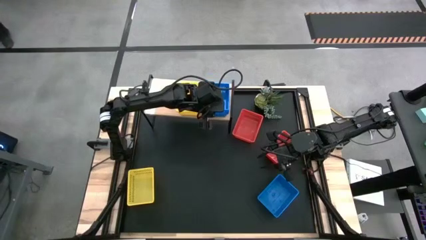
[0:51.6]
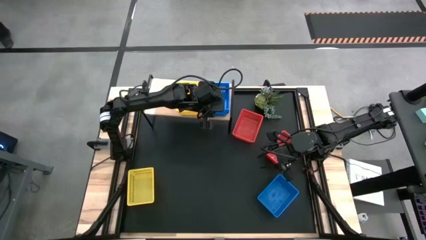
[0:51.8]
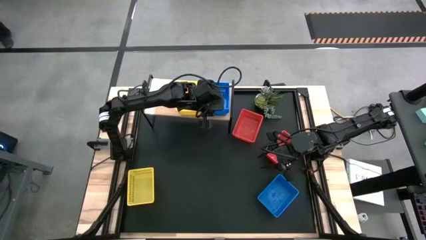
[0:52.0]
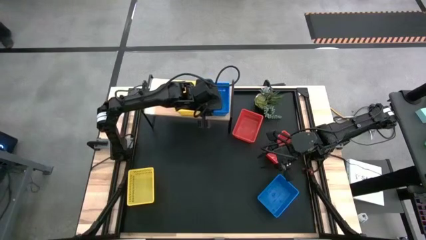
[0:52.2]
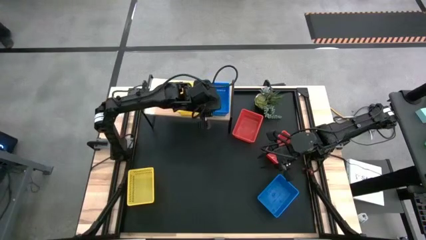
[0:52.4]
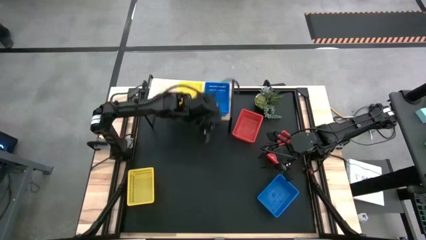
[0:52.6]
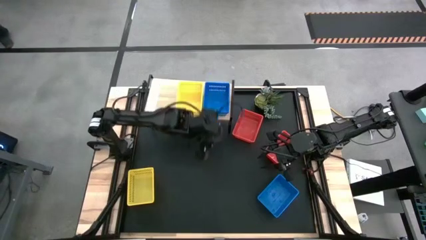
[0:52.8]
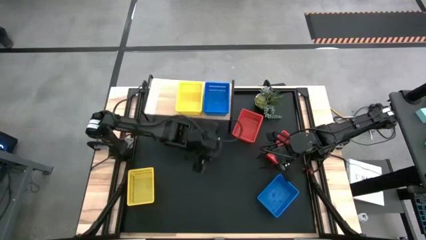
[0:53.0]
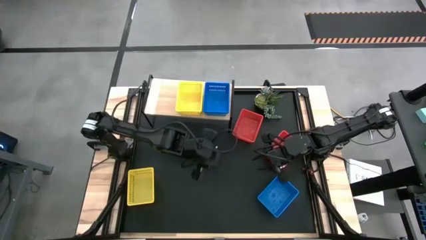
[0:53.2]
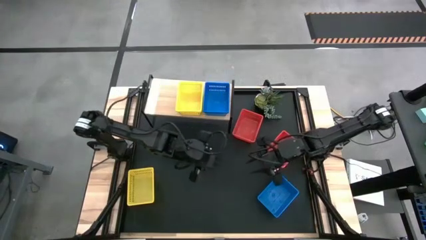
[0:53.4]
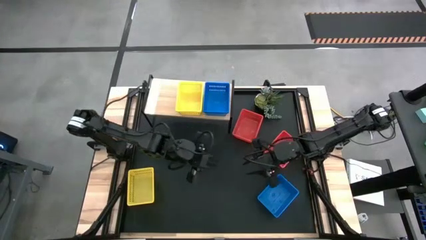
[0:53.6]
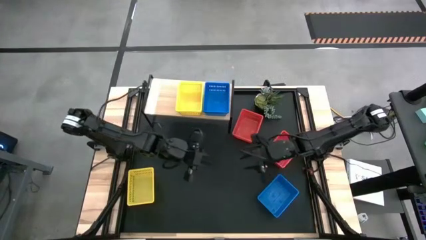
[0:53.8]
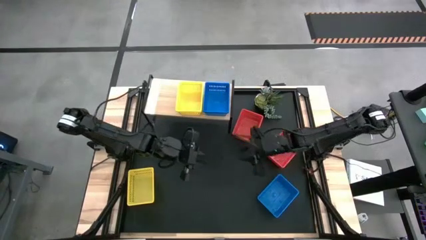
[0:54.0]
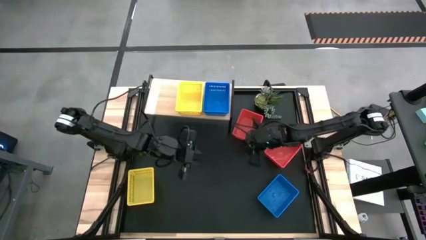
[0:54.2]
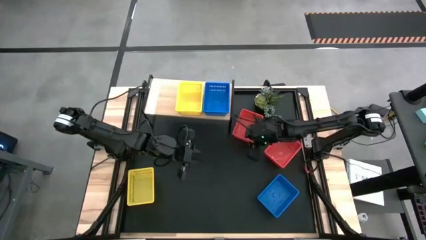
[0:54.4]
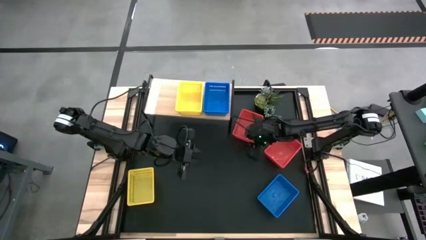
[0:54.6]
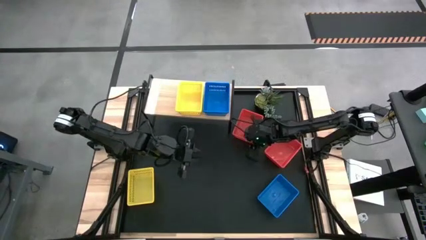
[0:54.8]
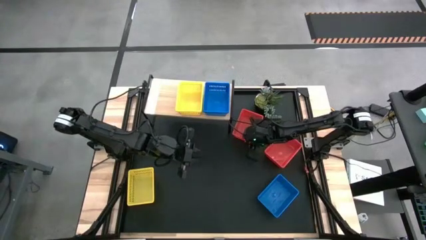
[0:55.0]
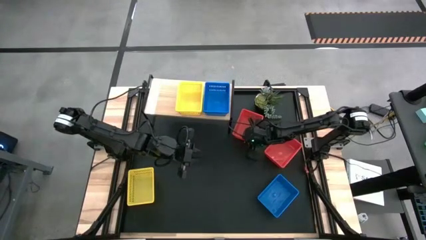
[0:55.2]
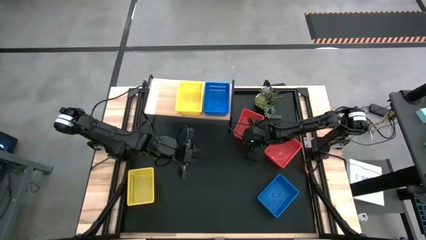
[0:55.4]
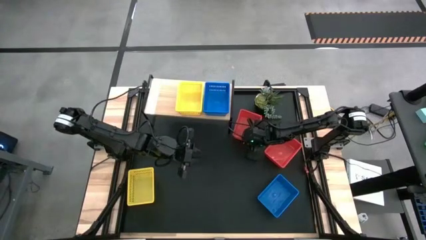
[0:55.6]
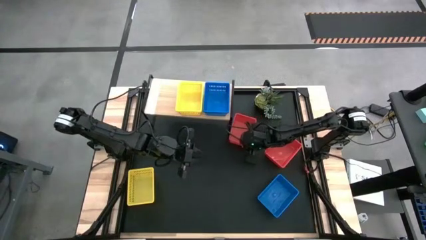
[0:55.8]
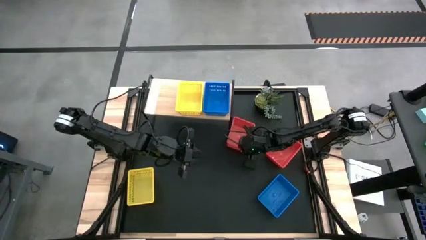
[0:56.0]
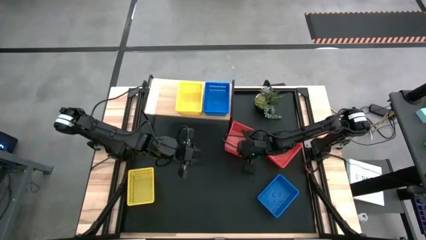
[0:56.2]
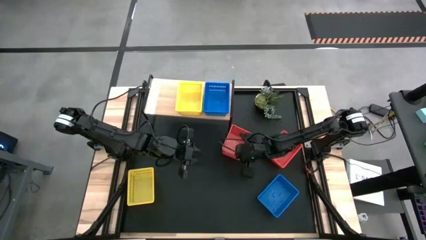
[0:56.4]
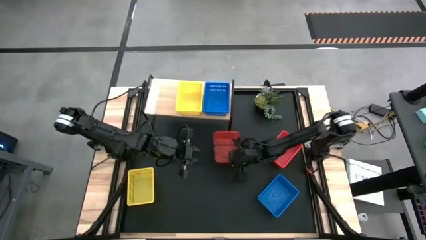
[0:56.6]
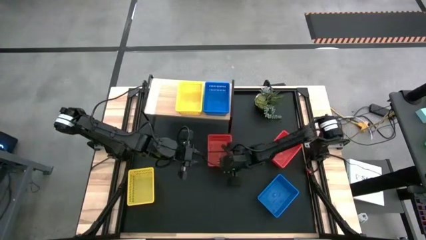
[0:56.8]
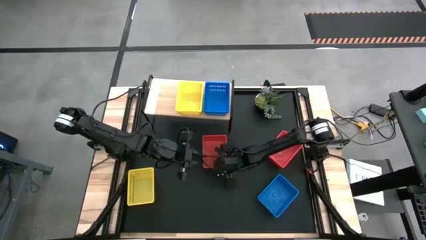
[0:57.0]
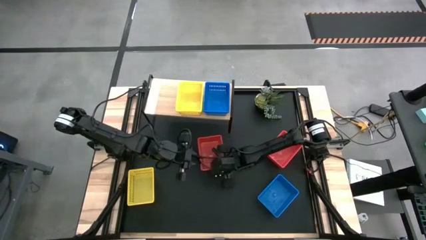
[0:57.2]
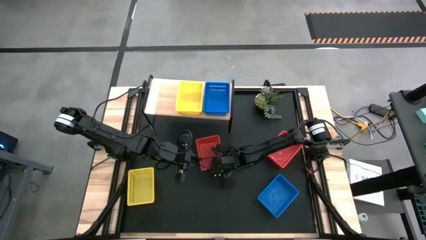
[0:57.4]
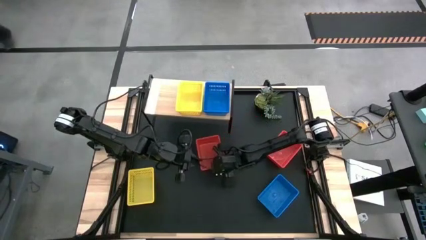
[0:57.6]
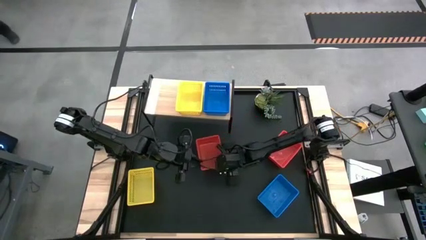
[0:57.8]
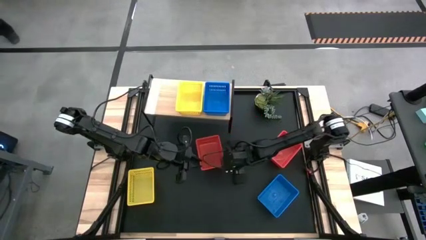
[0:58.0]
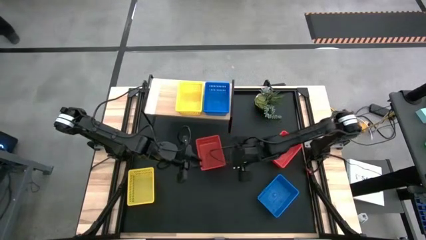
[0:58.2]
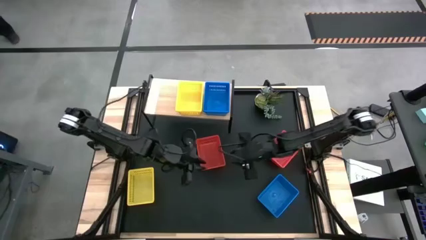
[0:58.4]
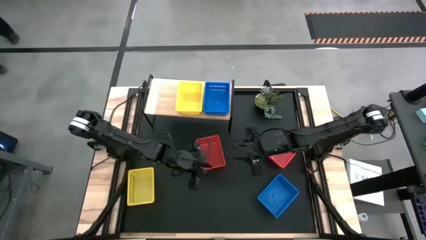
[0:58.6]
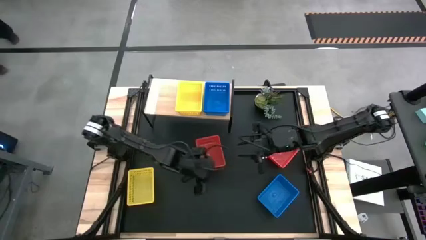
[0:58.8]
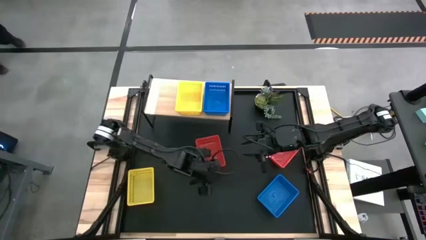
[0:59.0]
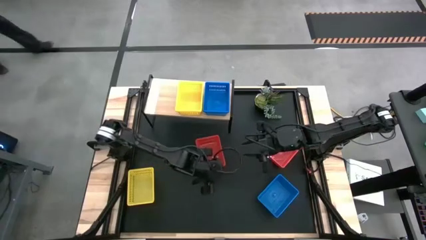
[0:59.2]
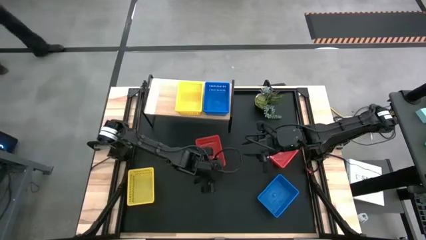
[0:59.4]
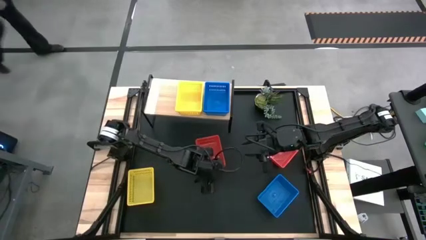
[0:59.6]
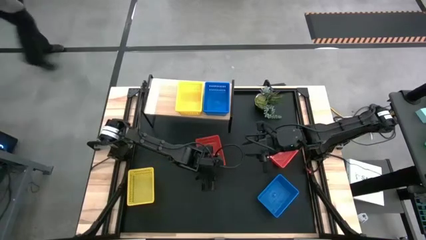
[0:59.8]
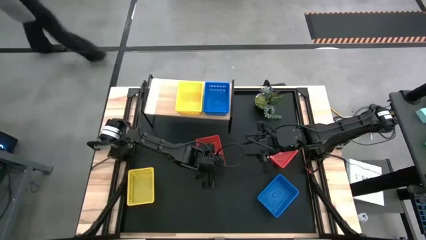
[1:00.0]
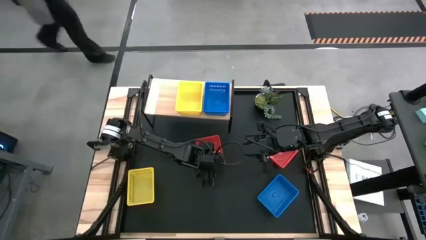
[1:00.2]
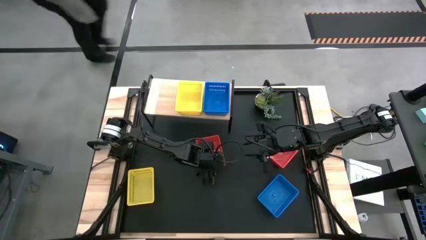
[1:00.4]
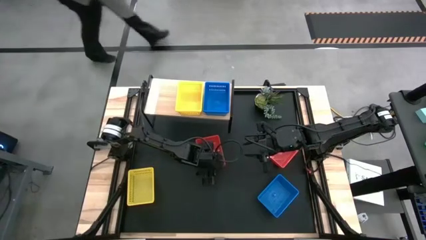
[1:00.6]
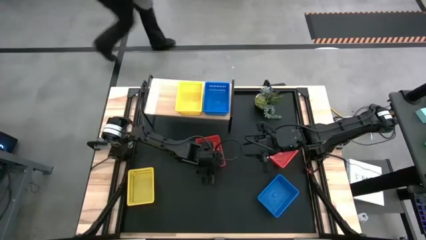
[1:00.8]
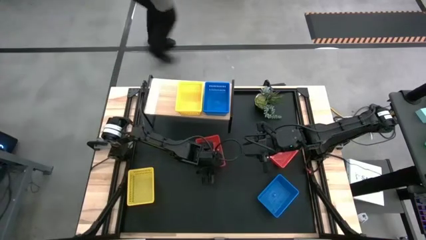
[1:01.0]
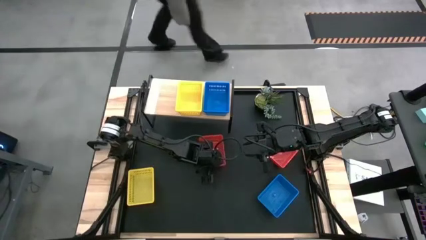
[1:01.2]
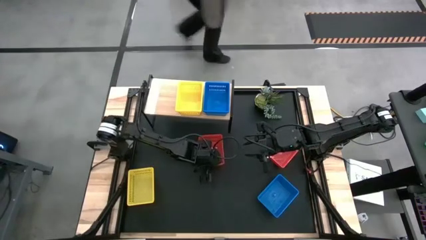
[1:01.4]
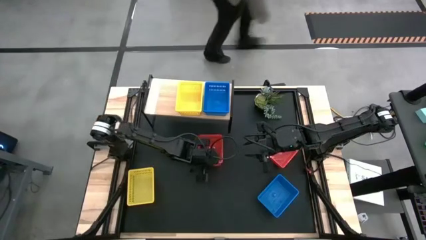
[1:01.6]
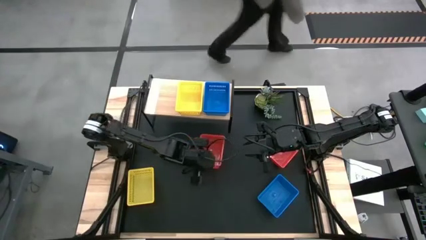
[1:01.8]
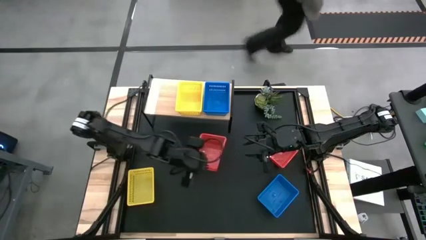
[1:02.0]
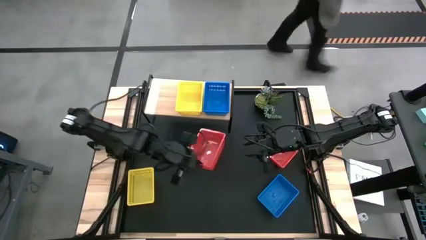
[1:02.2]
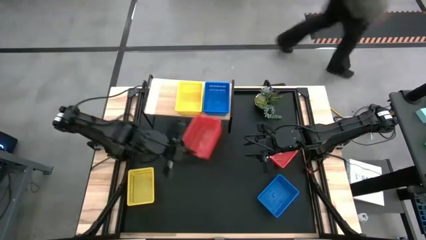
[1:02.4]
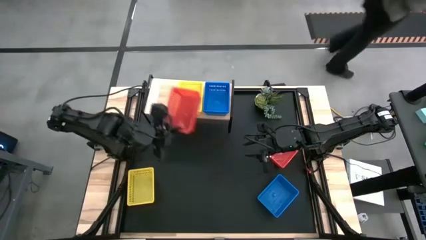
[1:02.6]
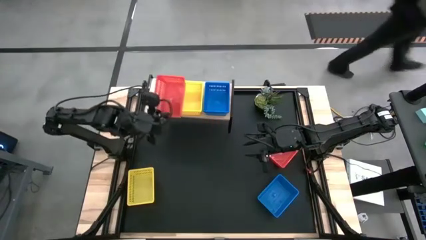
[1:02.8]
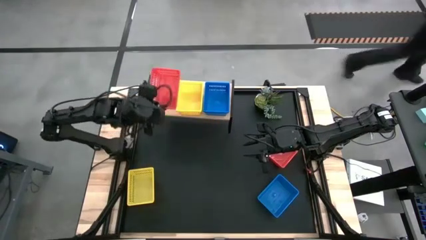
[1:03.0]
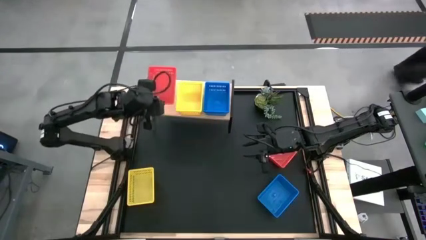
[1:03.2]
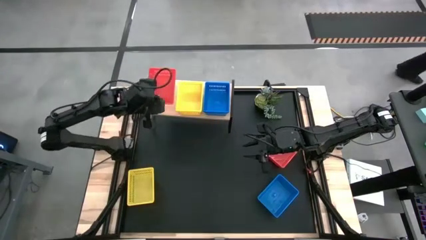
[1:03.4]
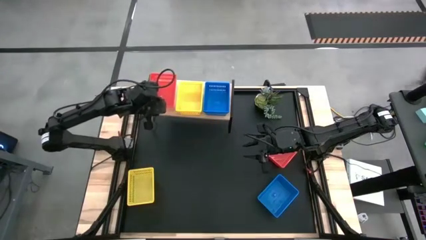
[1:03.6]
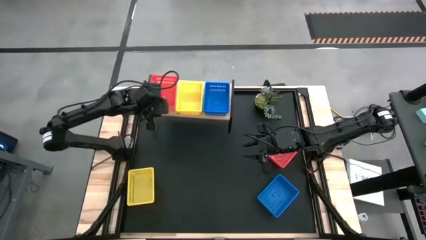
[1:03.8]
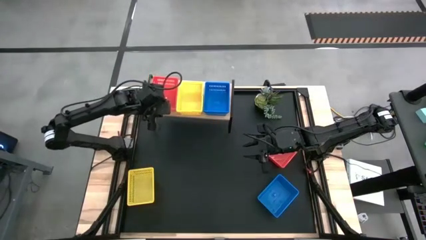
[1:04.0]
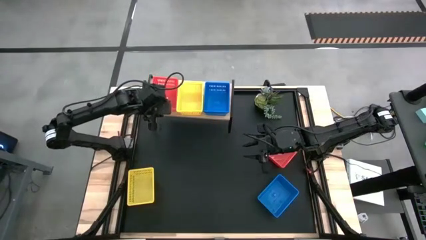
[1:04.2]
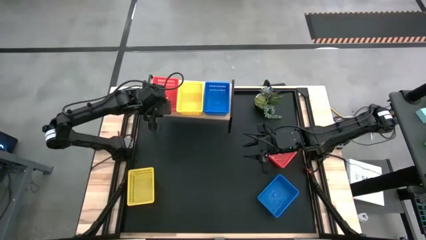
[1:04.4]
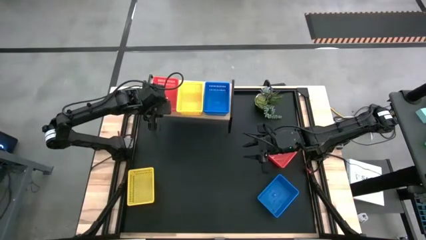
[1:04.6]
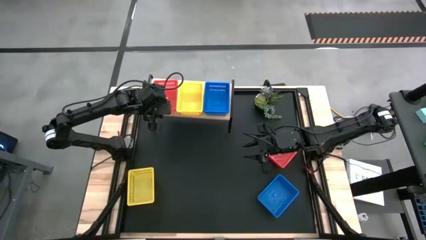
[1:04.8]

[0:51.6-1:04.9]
Task: Stack baskets on shelf by color
Put the left red bin on the shelf

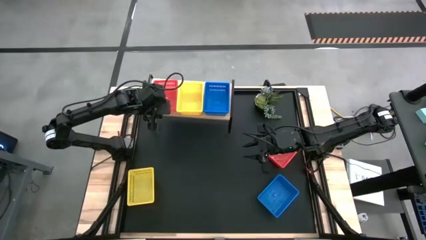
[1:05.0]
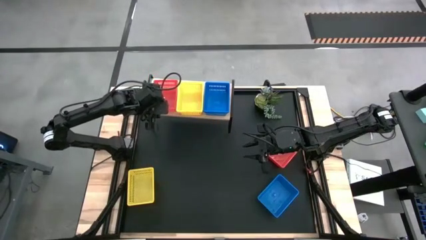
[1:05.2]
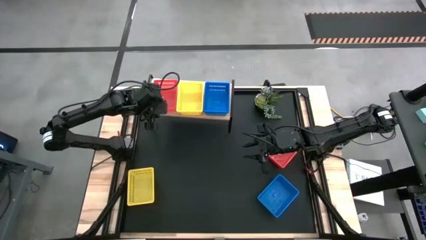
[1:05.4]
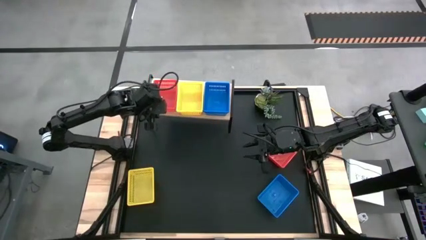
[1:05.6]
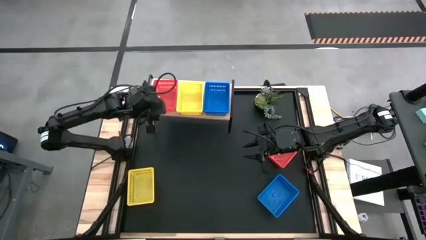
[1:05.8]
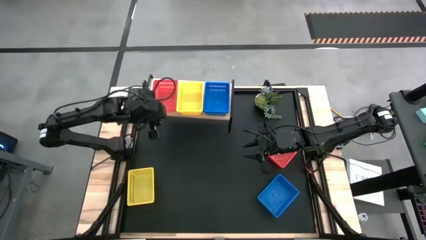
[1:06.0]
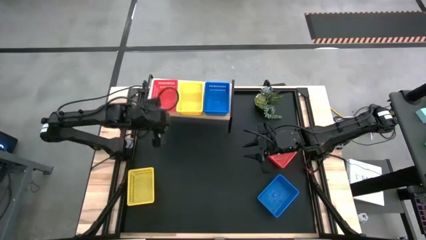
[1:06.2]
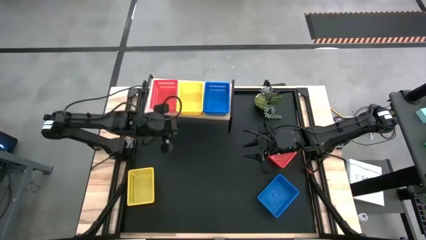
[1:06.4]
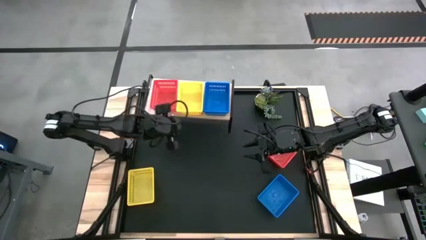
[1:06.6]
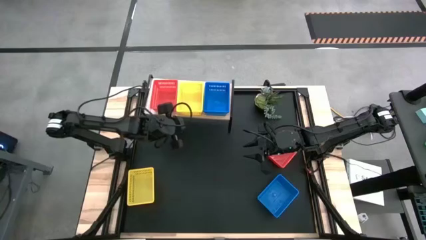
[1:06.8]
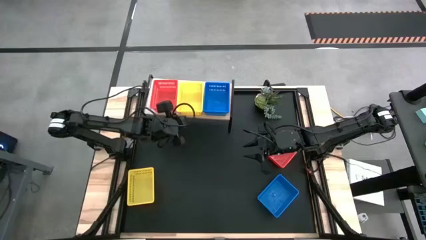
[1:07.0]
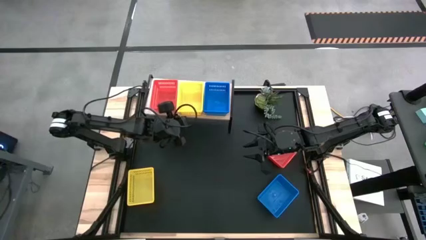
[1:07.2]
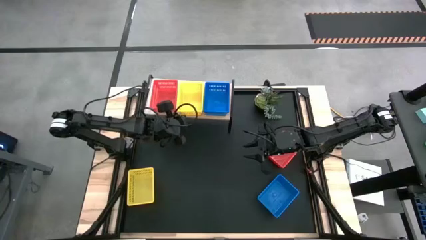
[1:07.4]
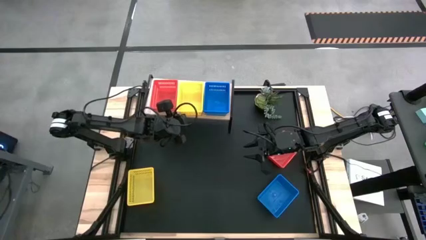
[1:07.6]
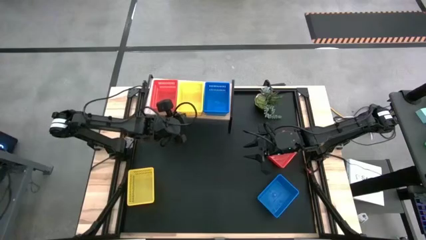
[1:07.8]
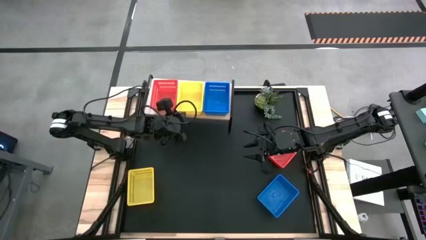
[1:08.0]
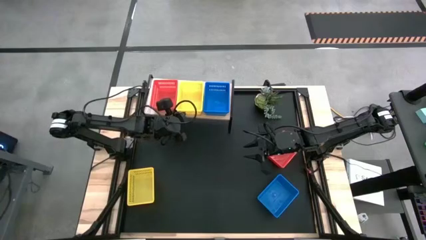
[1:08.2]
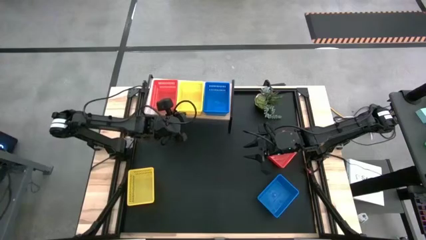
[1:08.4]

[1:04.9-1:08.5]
Adjust the stacked yellow bin
